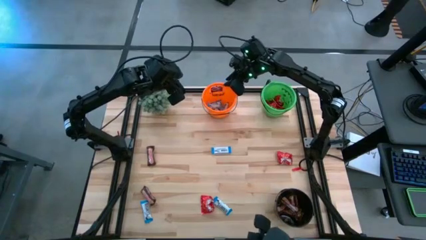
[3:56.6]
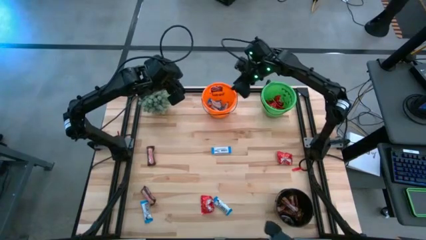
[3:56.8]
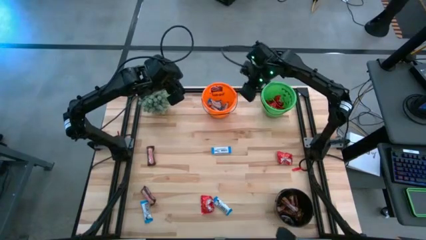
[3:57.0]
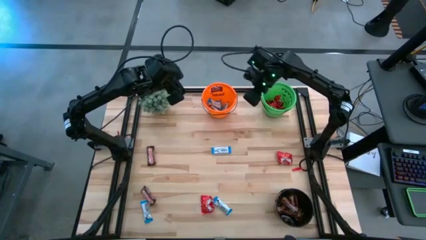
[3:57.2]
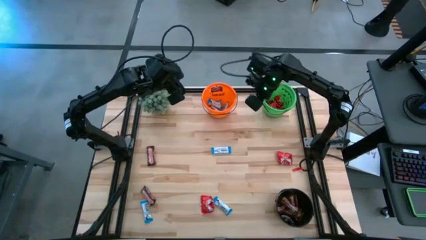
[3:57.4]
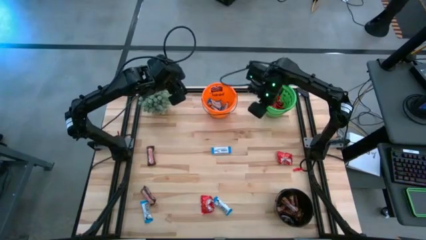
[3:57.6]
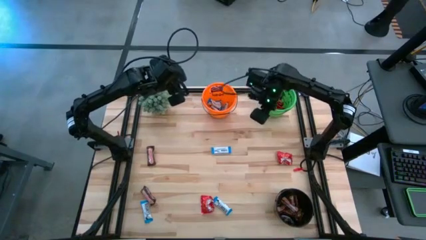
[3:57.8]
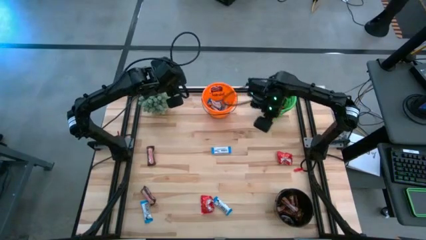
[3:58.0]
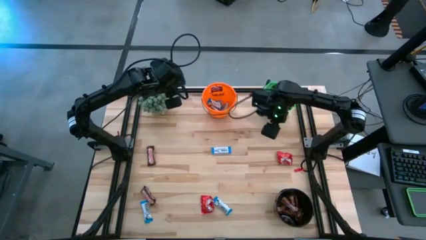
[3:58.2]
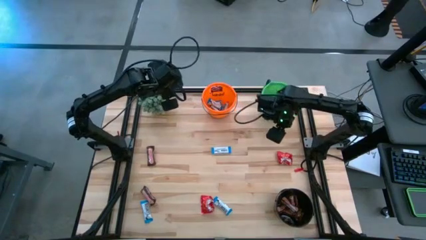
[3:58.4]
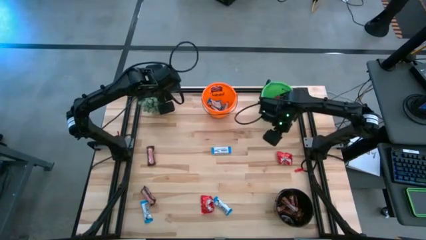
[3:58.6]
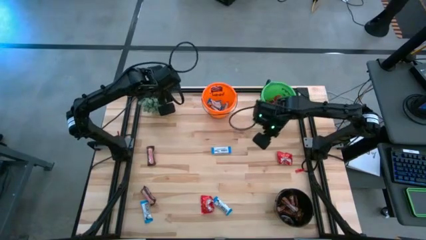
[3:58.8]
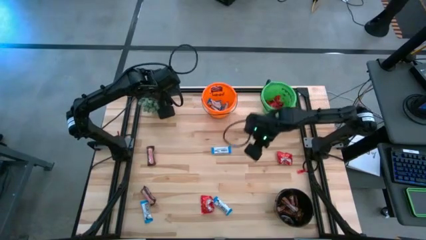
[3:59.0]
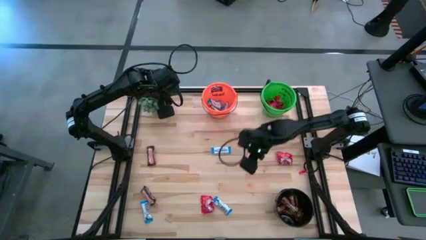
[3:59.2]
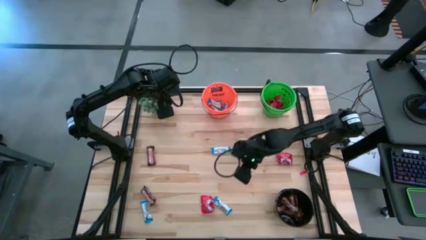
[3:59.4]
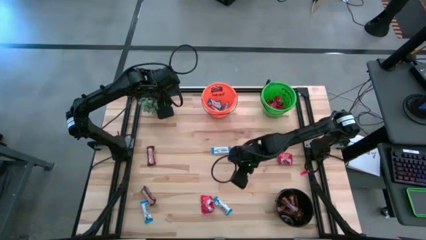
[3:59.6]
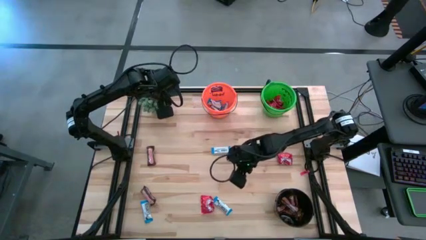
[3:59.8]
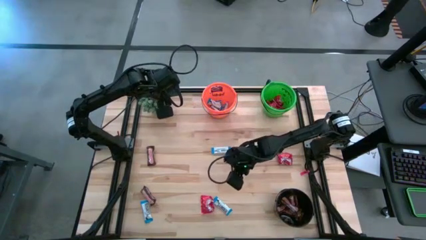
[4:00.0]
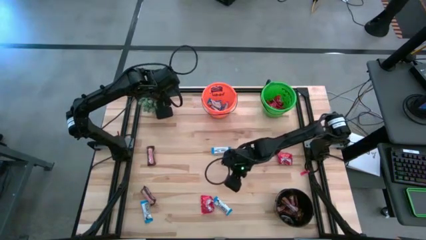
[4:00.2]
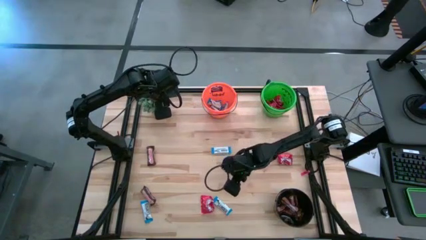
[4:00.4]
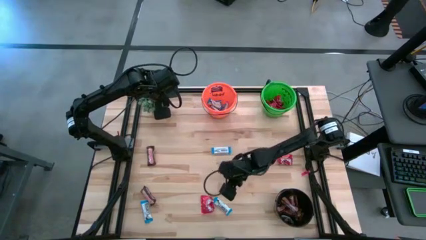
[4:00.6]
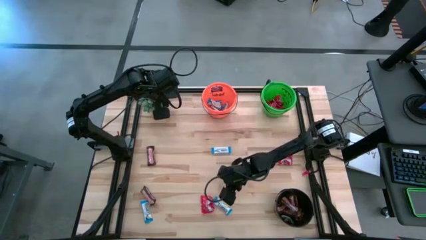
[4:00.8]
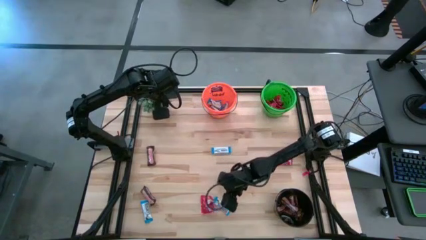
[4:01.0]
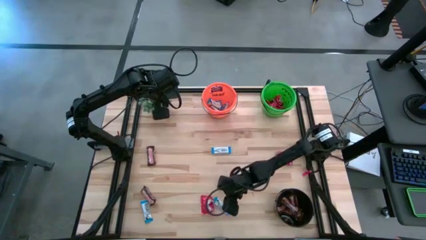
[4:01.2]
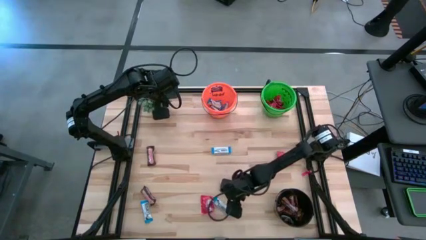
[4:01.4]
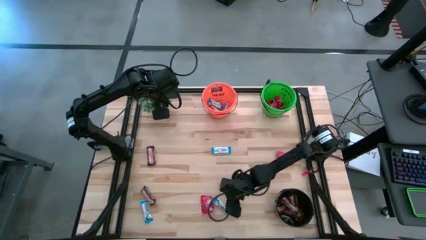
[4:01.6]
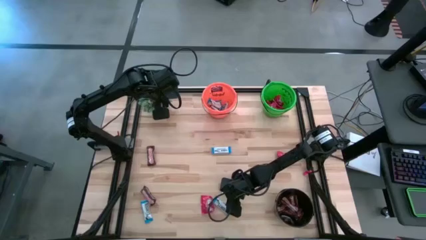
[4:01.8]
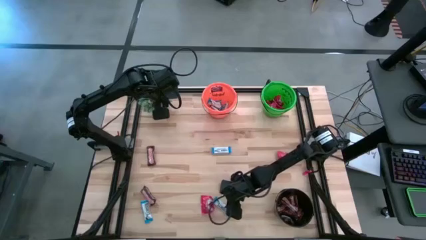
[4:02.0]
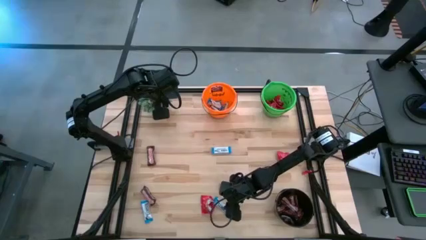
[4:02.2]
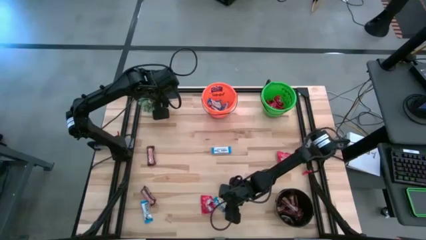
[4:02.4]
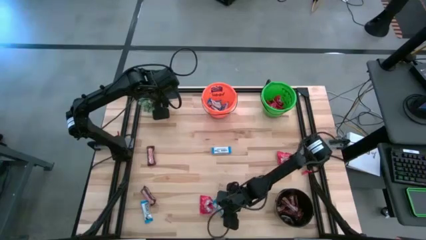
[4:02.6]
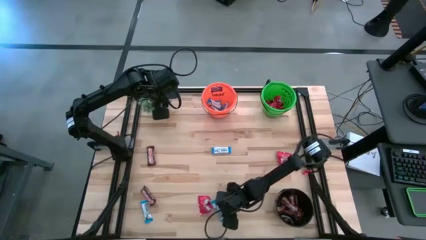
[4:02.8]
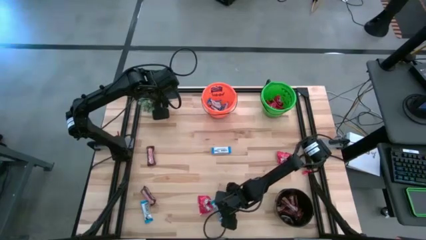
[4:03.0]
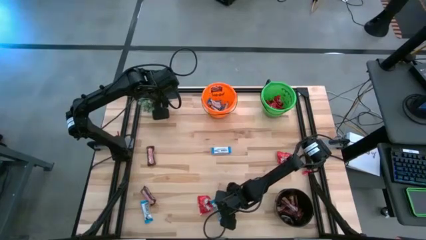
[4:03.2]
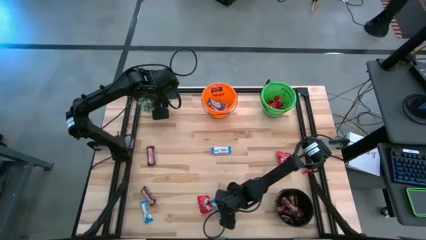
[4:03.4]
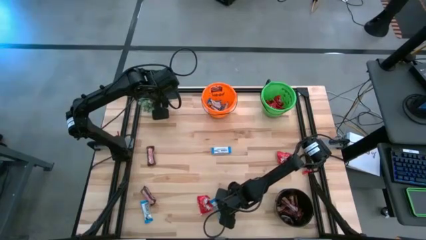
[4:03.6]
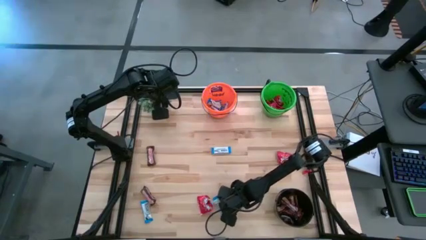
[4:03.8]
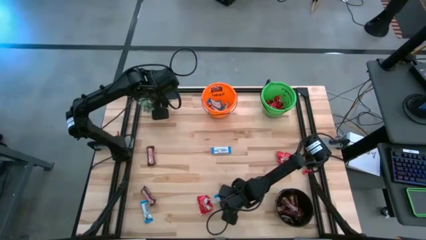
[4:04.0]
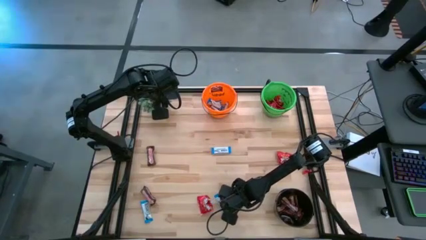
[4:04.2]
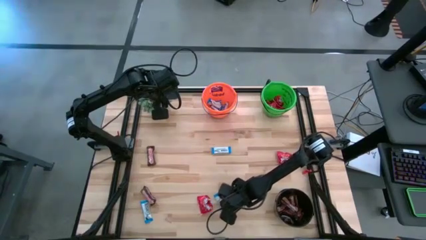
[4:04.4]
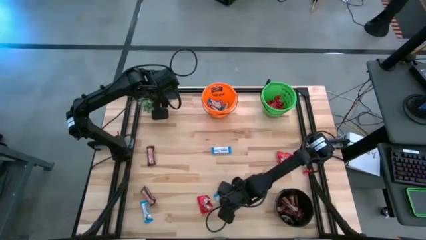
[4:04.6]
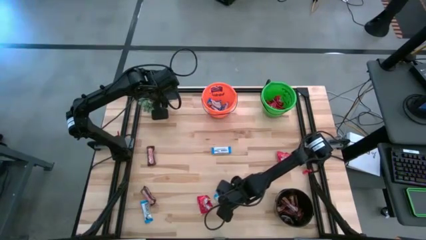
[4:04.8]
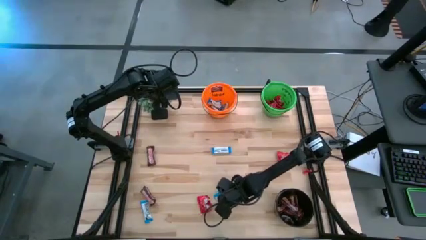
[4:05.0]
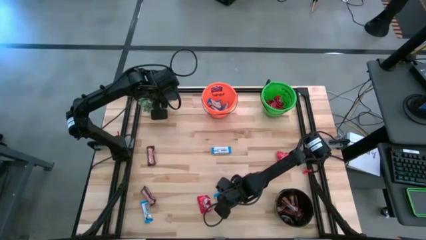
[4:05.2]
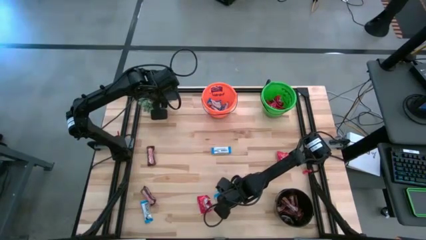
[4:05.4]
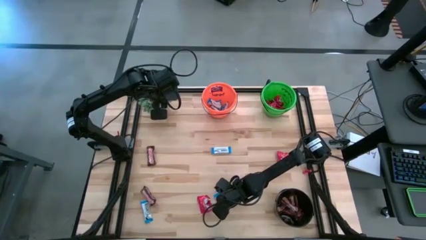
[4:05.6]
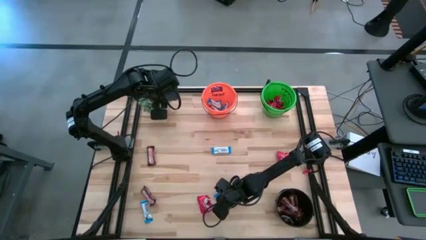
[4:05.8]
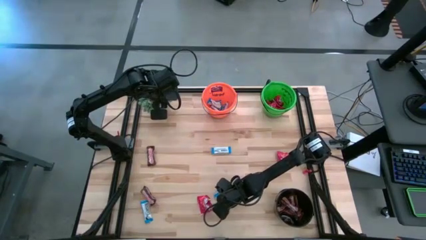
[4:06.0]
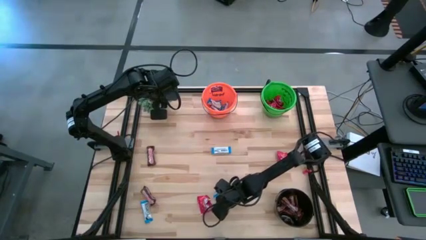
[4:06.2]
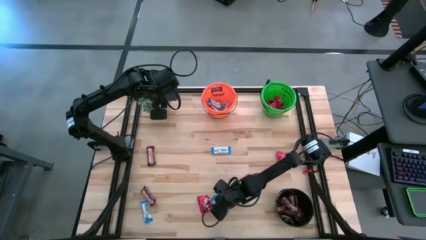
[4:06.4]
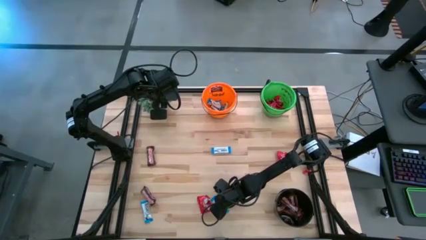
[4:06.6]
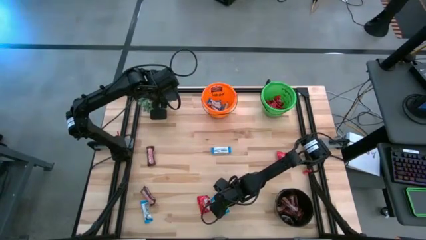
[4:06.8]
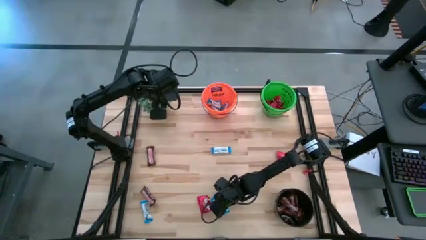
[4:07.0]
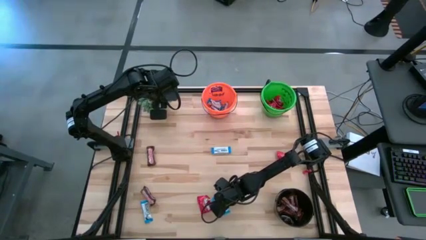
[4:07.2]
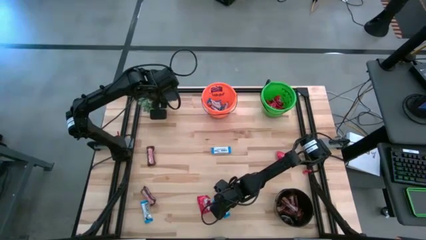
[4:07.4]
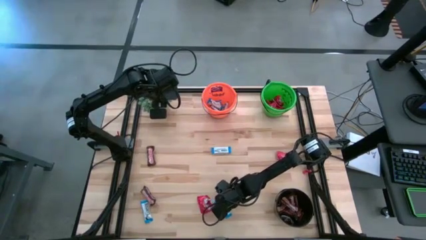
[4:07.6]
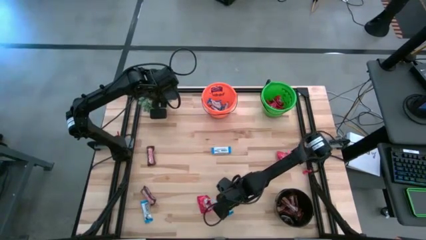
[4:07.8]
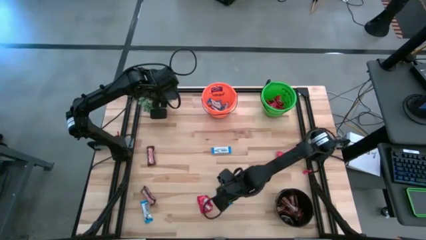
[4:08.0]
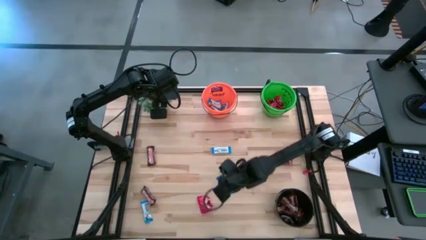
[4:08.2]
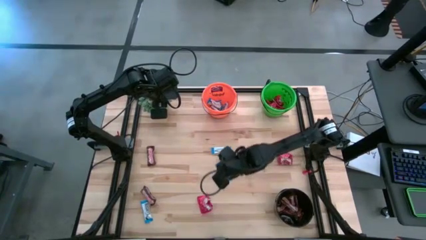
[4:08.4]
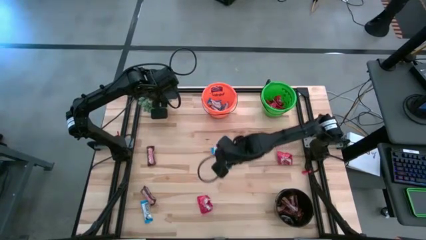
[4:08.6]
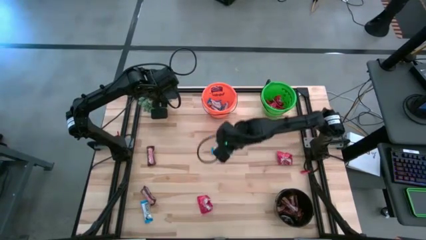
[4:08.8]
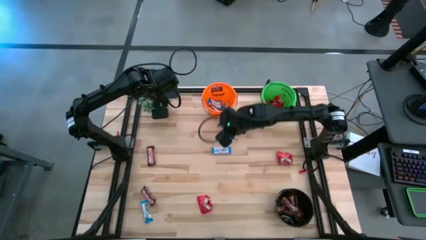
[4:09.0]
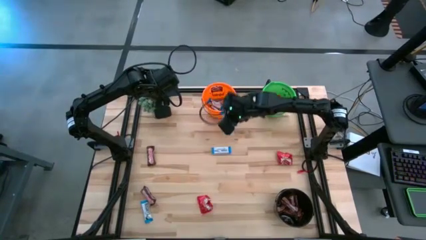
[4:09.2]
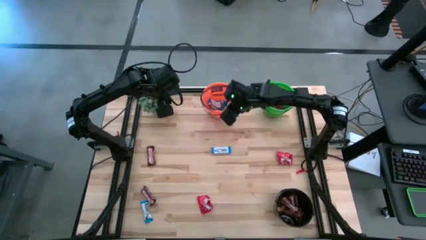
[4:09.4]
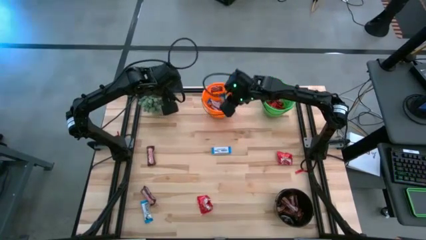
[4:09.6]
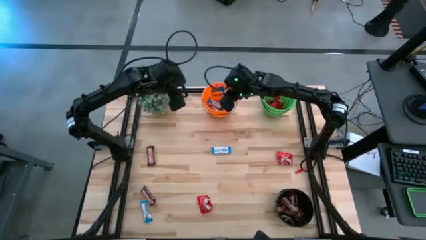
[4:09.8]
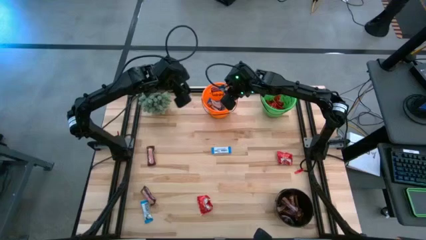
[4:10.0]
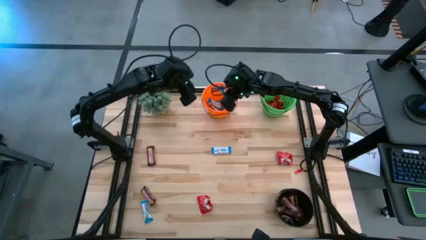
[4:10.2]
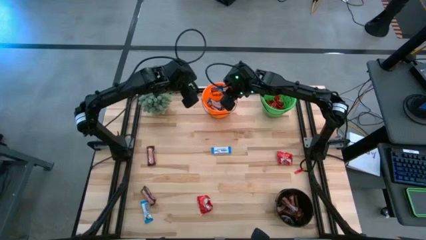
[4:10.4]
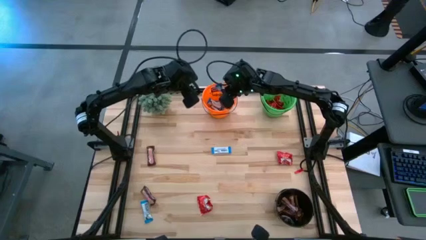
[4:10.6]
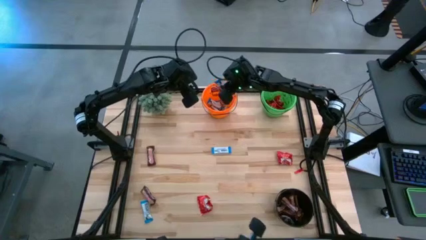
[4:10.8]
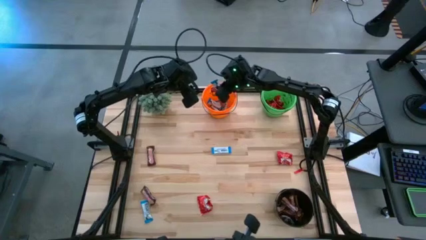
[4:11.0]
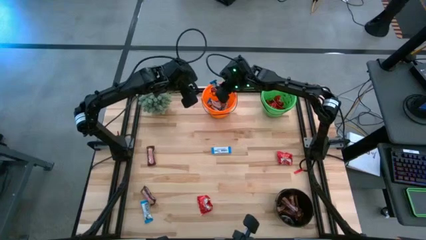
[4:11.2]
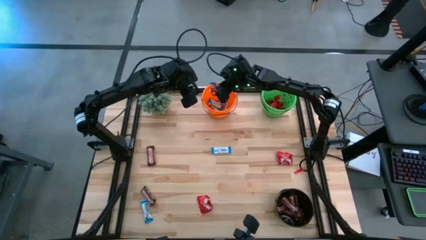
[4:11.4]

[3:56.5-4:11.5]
Task: Organize candy in baskets
Put the white chocolate bar into the orange bucket
